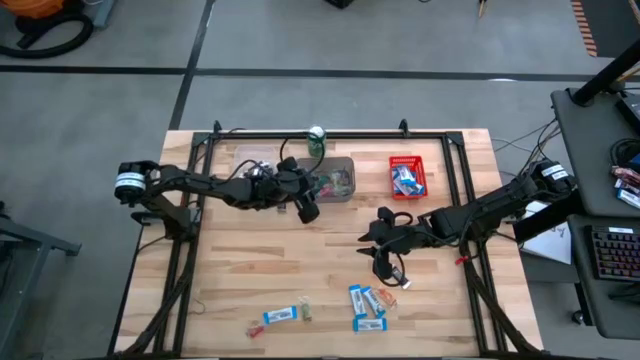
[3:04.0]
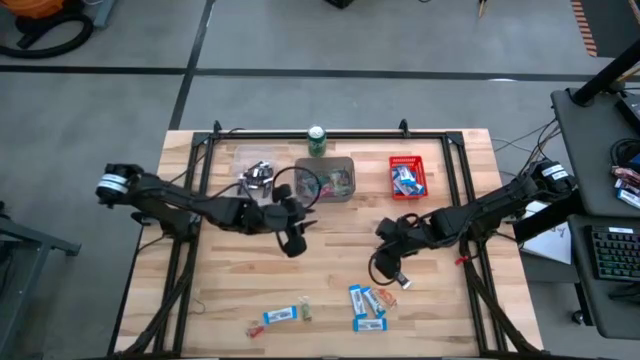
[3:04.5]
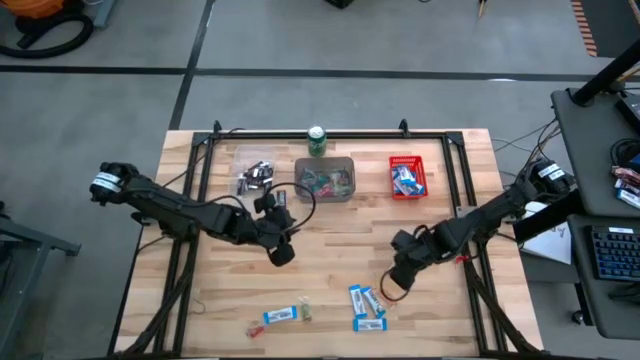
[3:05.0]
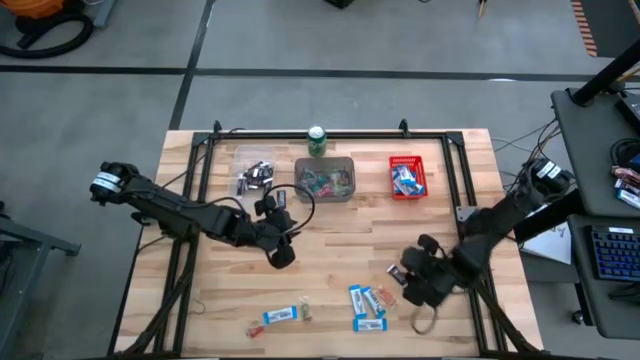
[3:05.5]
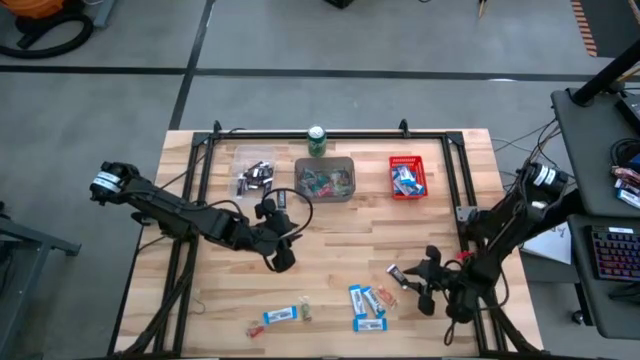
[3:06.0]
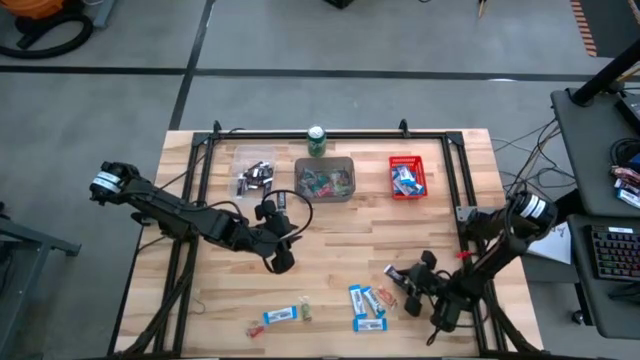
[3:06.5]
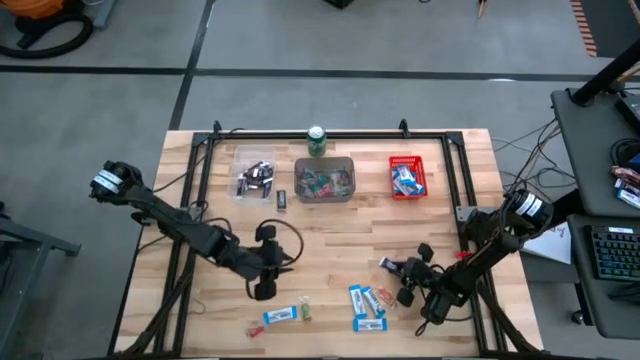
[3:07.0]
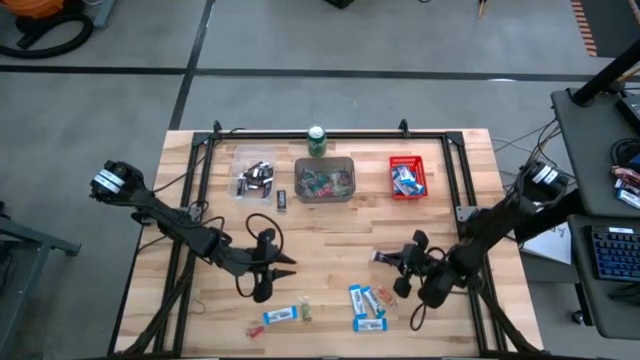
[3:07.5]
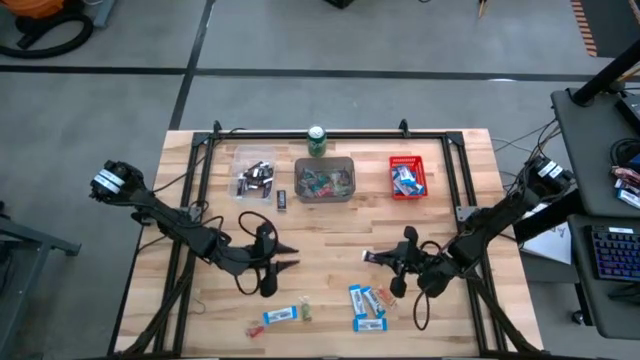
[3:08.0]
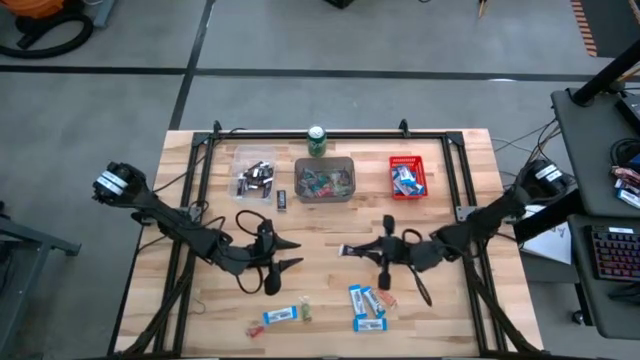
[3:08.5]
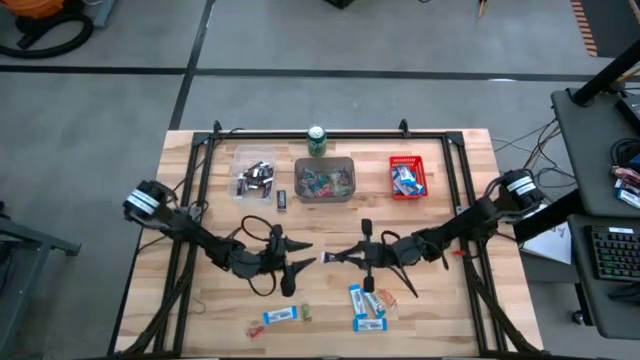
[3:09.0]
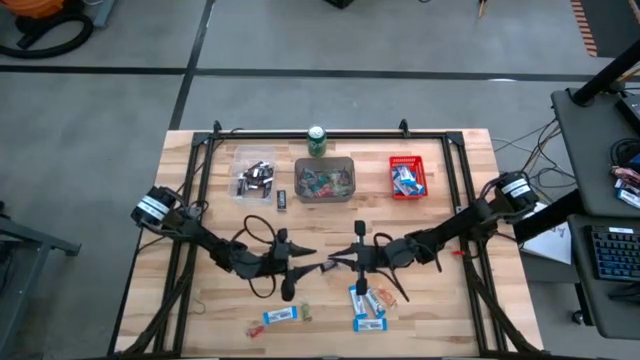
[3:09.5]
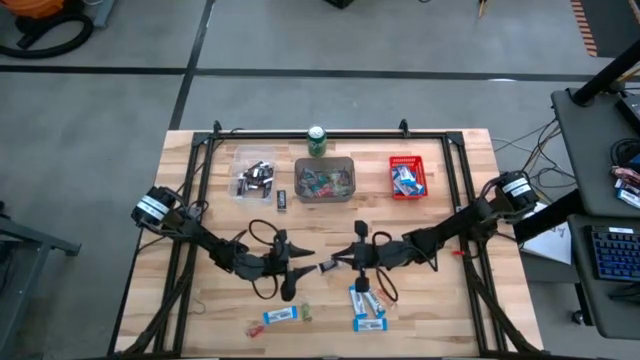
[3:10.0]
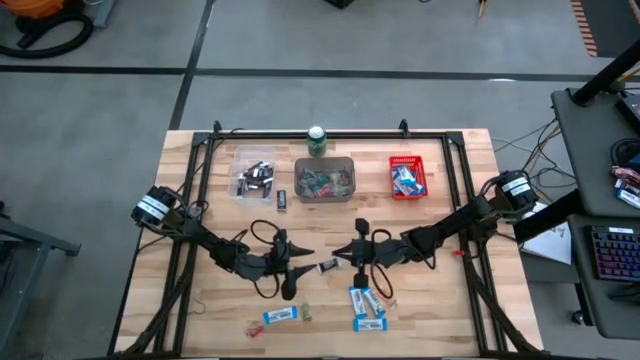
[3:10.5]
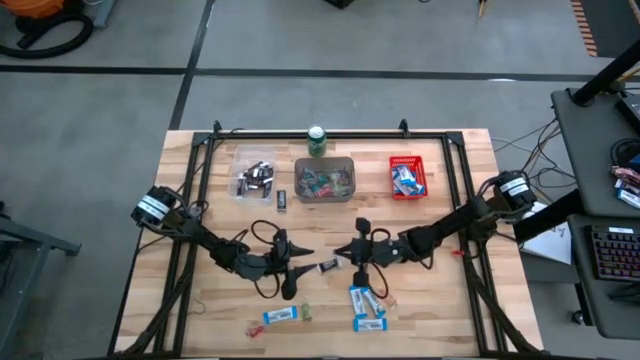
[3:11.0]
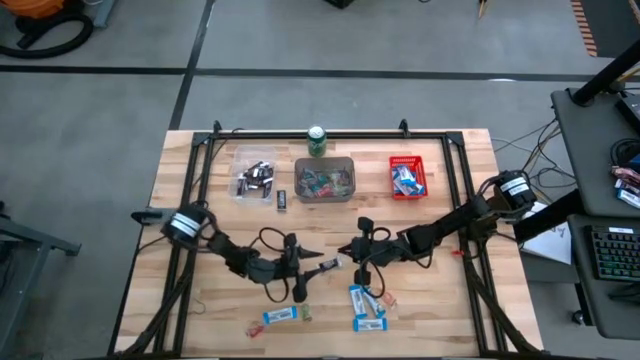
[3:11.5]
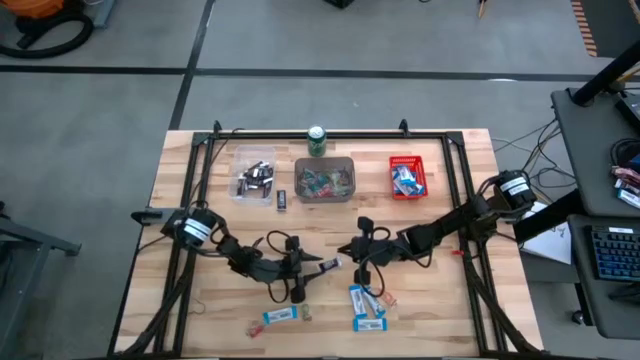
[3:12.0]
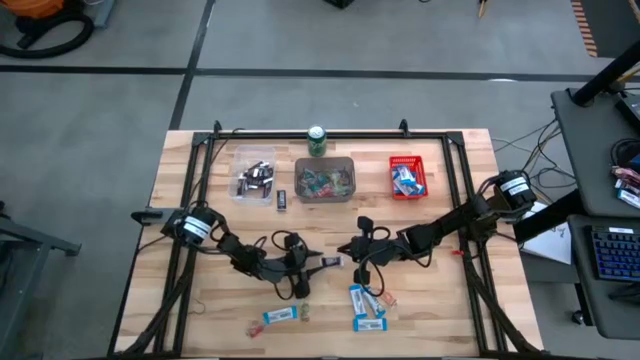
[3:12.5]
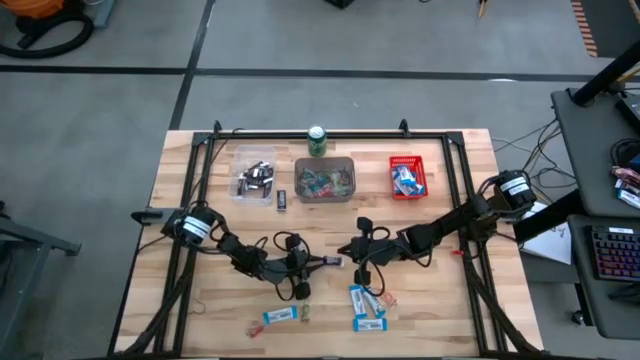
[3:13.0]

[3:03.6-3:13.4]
Task: Organize candy in baskets
Put the brown chocolate bar into the transparent bin

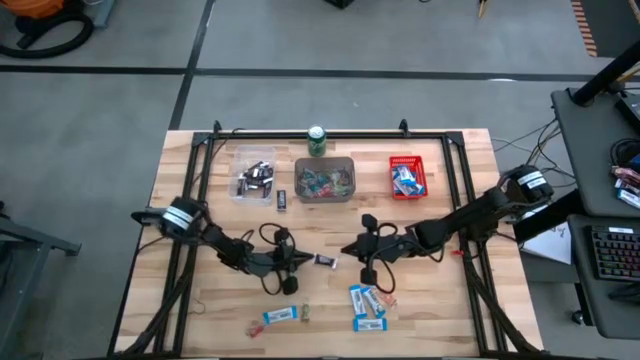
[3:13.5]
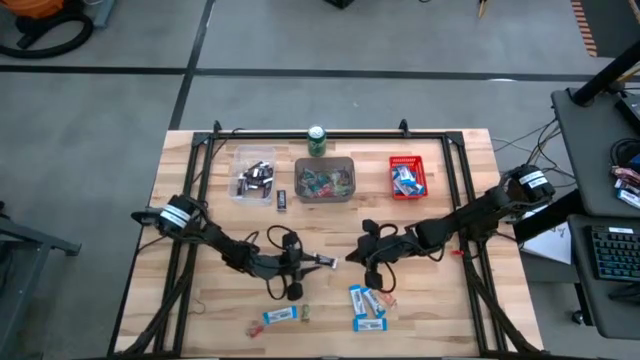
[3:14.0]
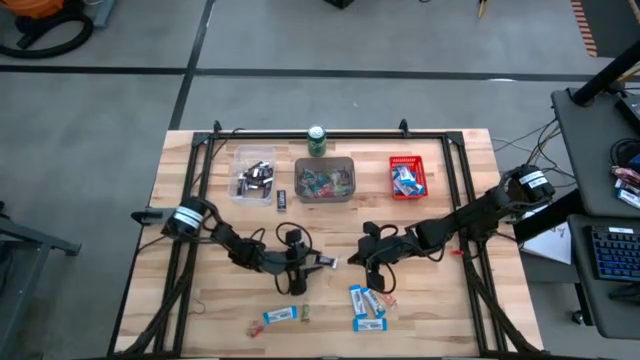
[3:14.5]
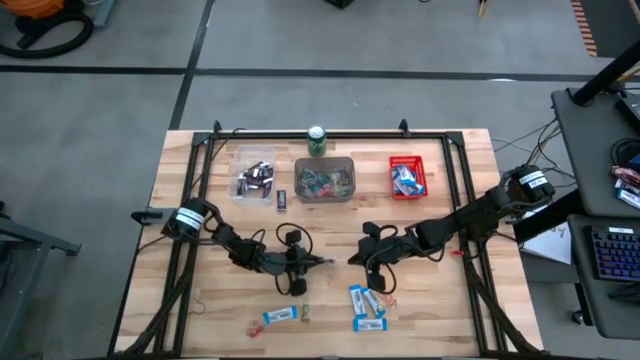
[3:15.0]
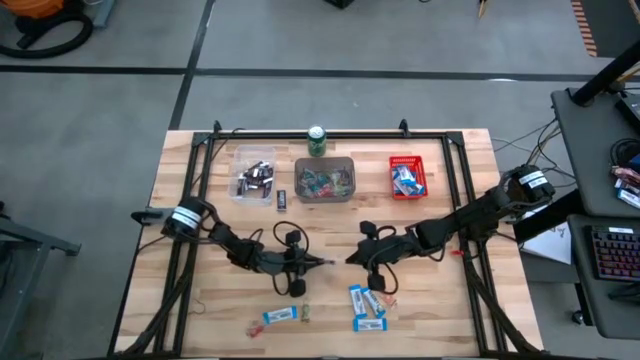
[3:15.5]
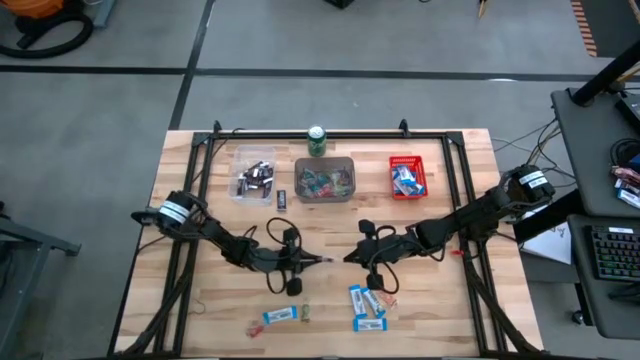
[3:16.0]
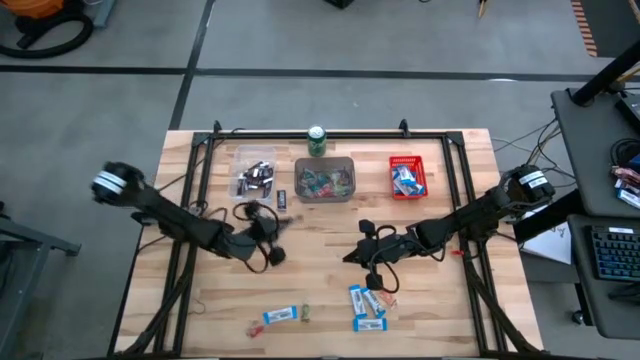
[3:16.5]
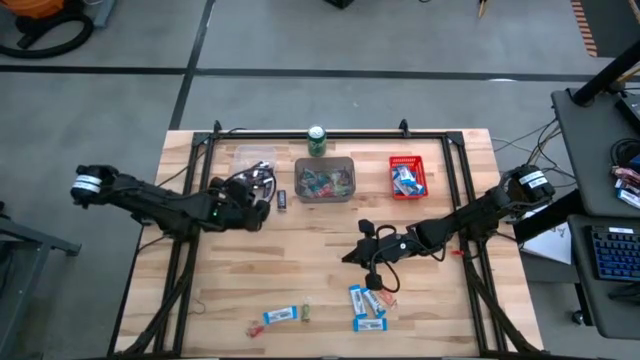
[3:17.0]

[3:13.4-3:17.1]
Put the brown chocolate bar into the transparent bin

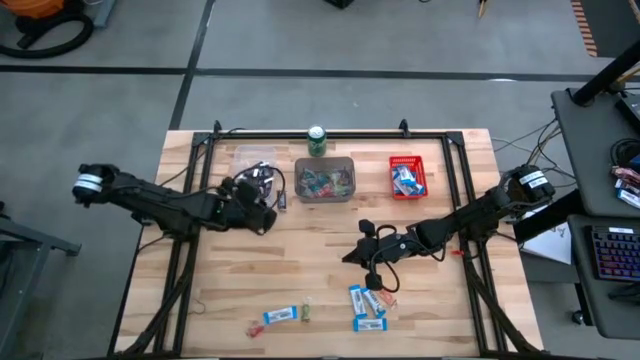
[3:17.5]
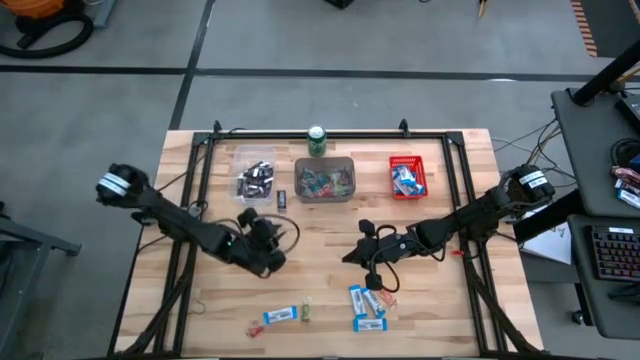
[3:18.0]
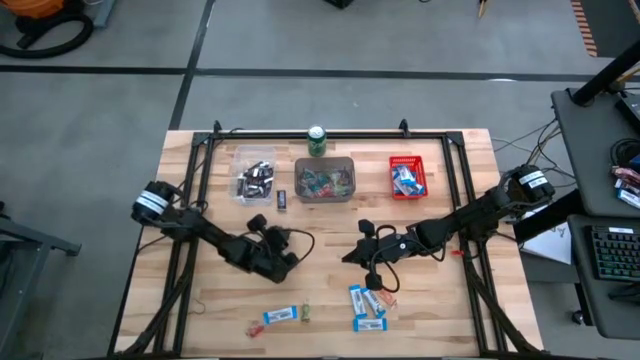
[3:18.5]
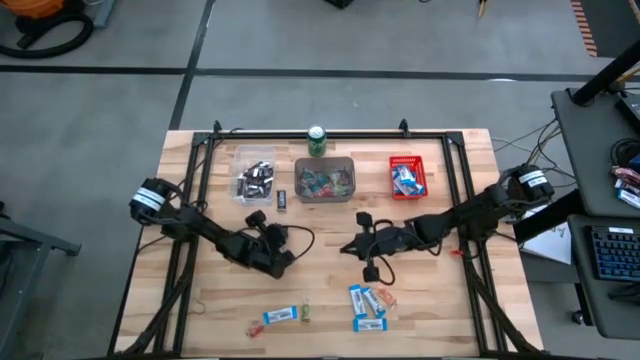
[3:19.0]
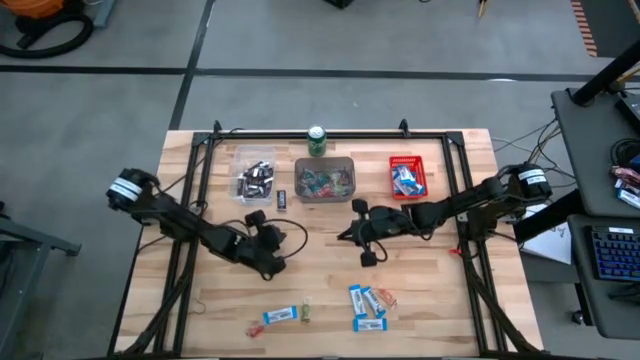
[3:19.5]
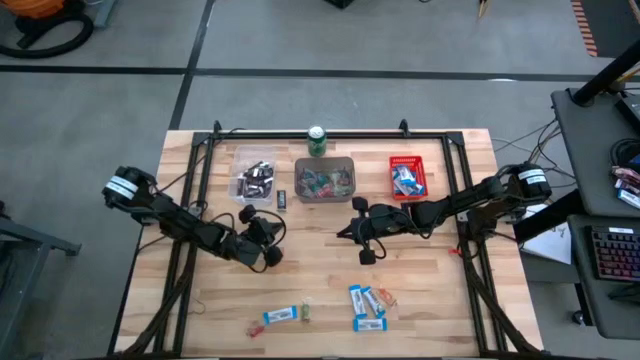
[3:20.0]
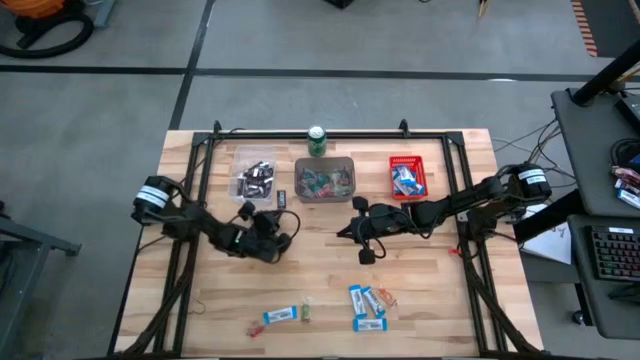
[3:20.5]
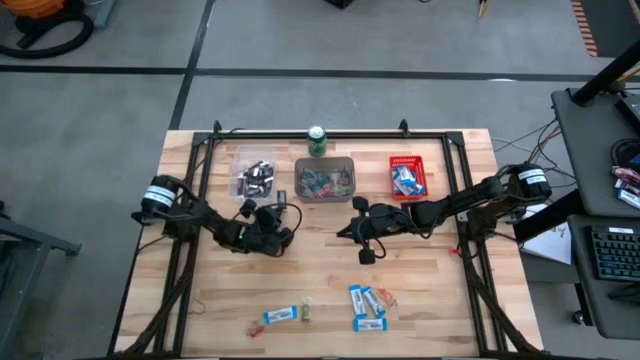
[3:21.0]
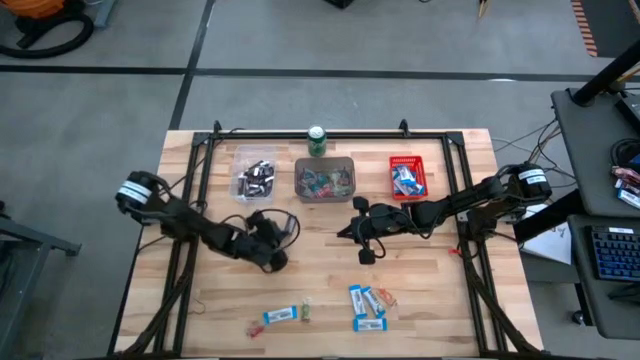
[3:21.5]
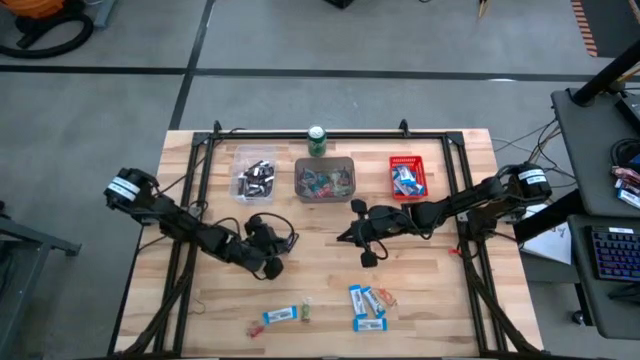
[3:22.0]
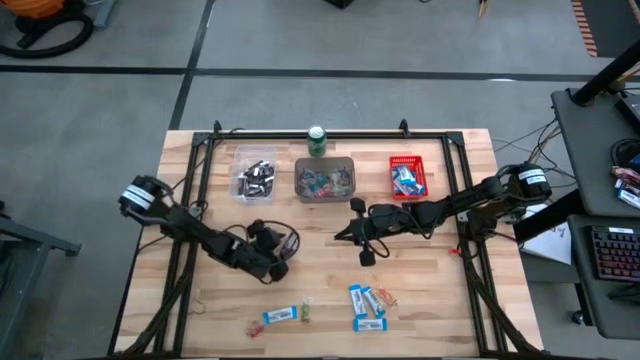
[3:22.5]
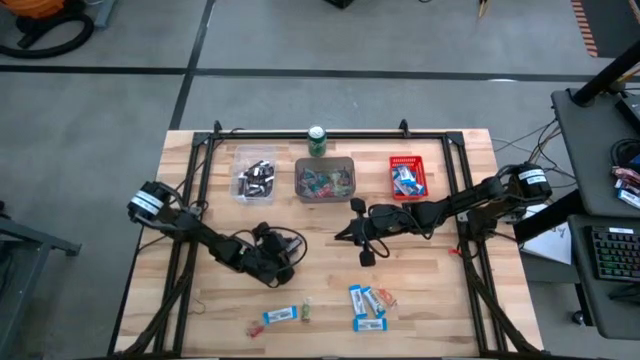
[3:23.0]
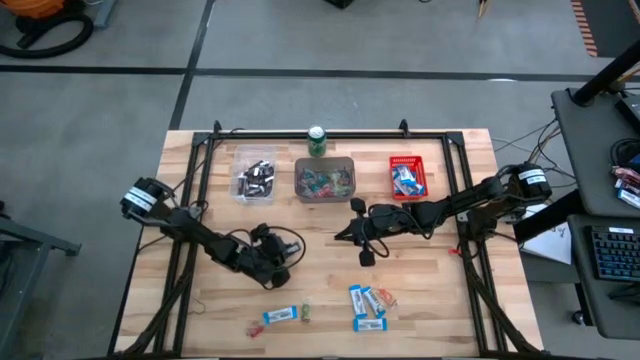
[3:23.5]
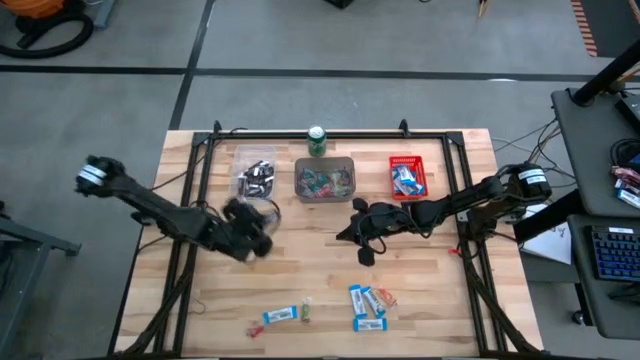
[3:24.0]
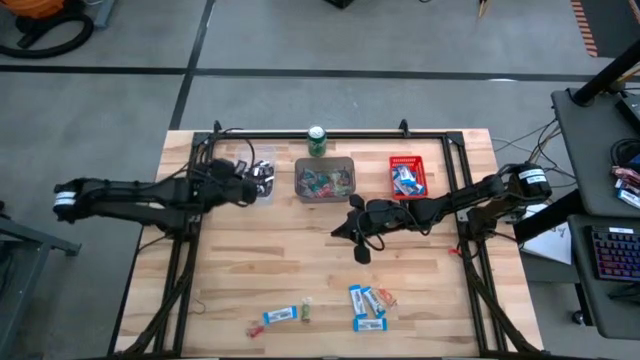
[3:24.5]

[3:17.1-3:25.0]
Put the brown chocolate bar into the transparent bin

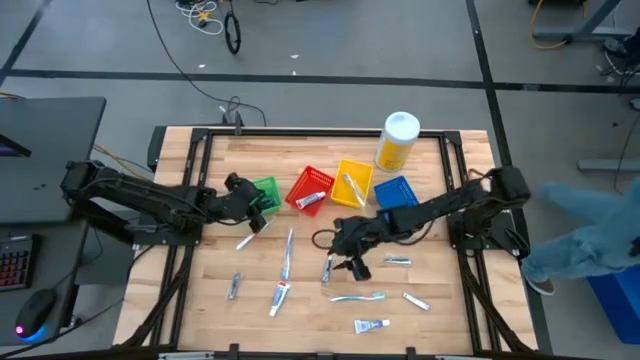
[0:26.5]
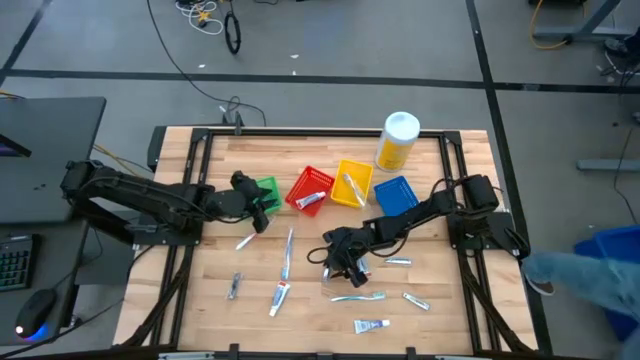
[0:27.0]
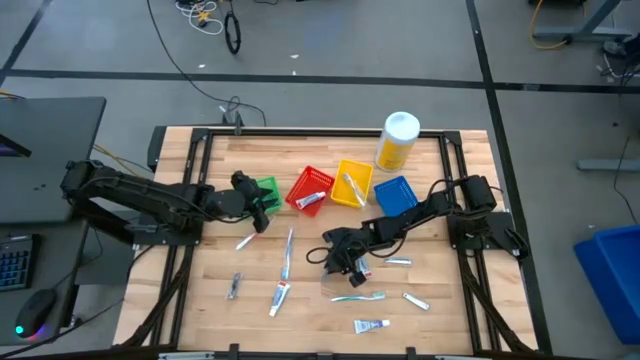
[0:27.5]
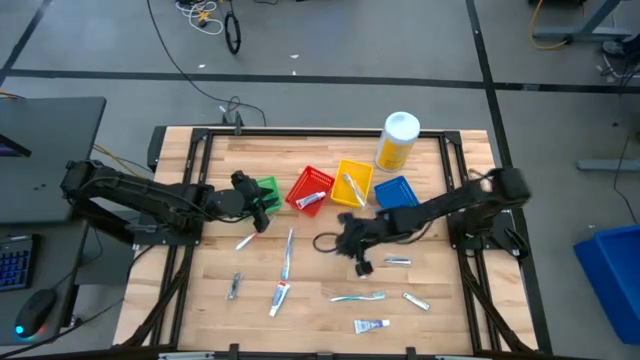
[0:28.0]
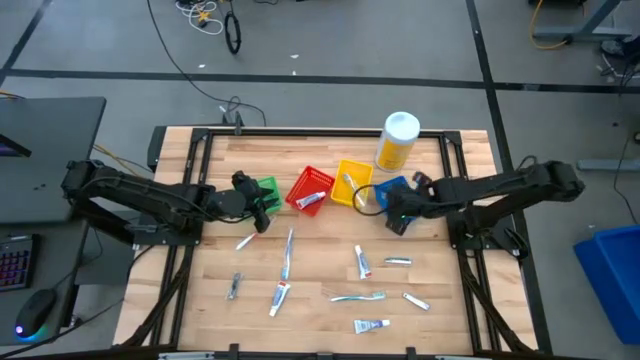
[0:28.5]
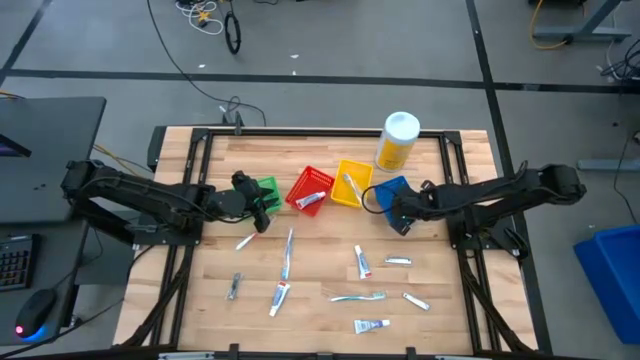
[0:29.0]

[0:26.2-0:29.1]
Task: Pick & Place Travel size toiletries
Put the silver nail cutter into the blue bin
